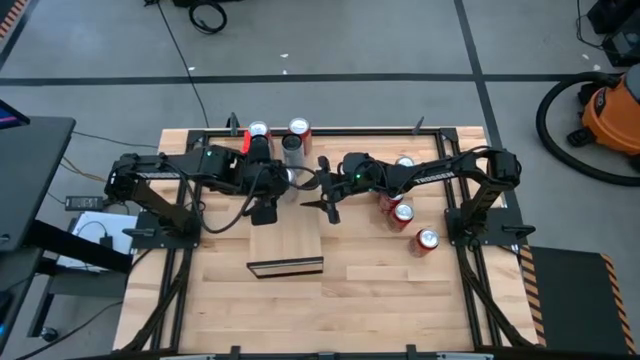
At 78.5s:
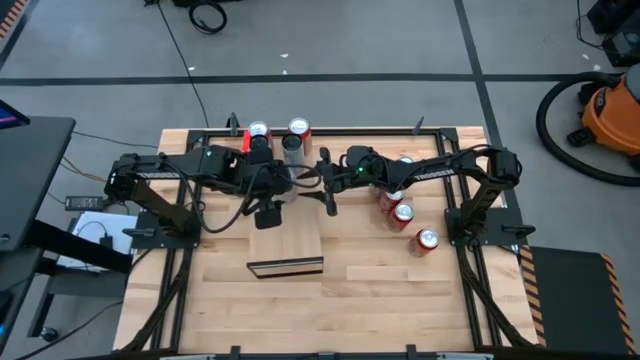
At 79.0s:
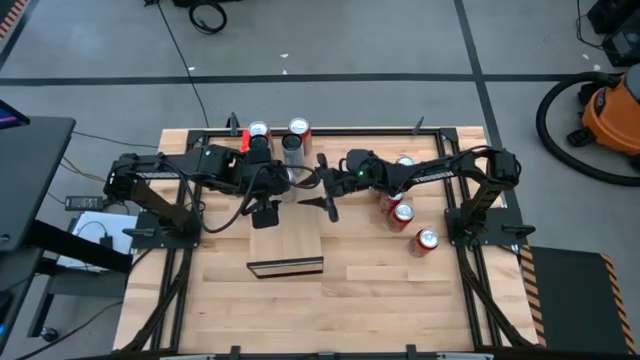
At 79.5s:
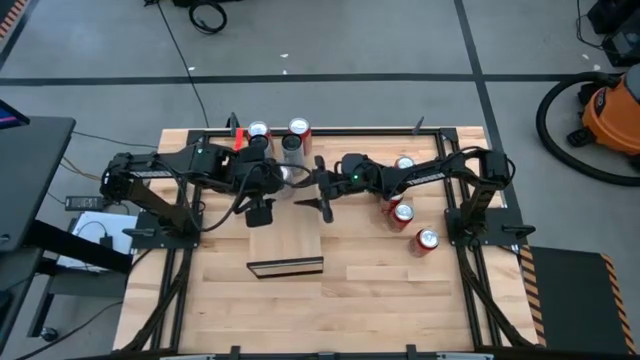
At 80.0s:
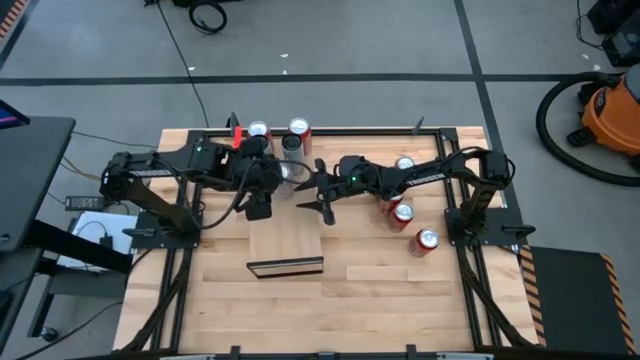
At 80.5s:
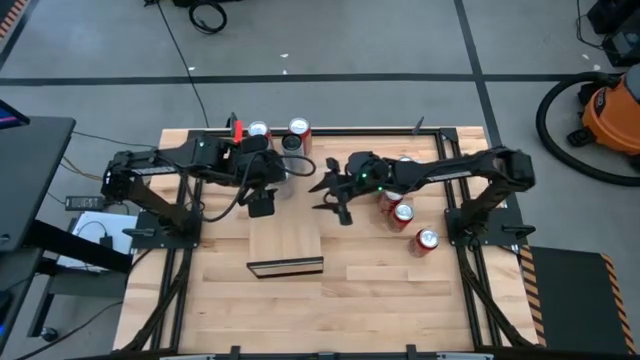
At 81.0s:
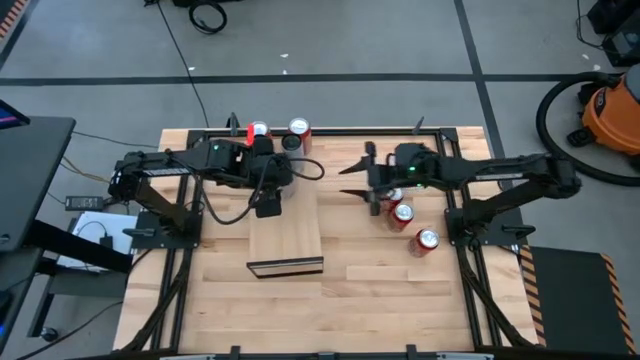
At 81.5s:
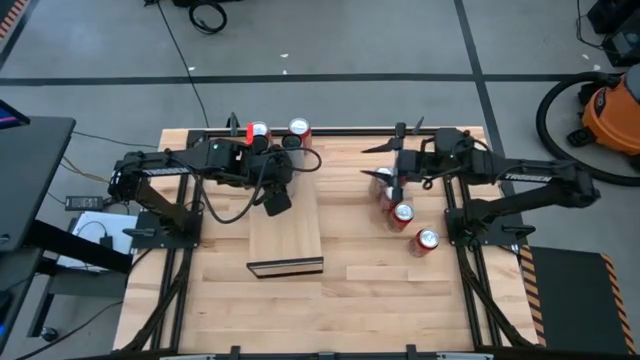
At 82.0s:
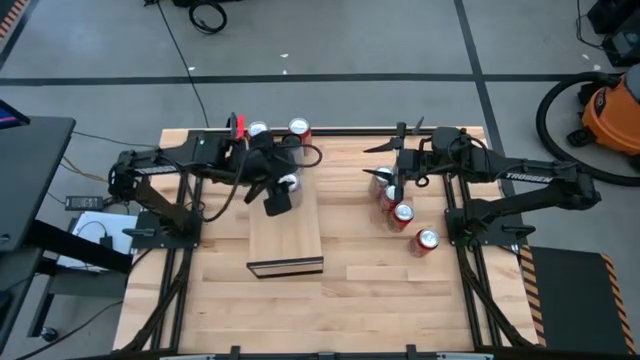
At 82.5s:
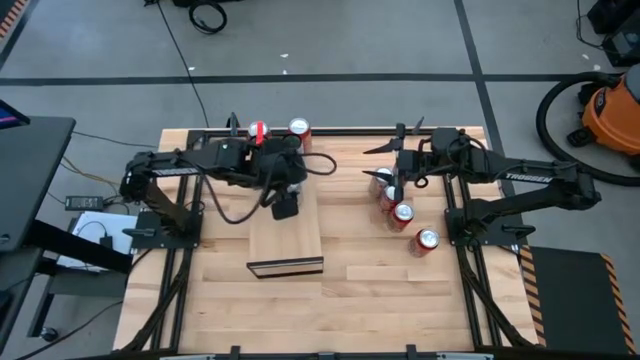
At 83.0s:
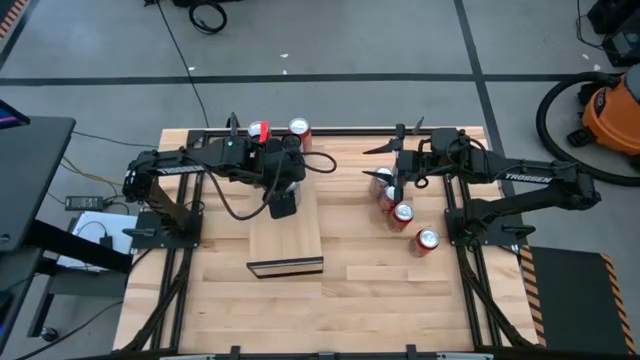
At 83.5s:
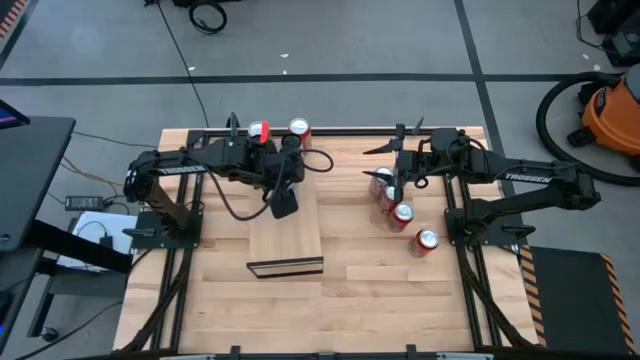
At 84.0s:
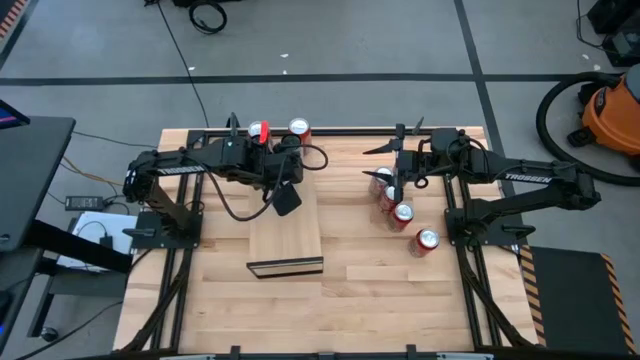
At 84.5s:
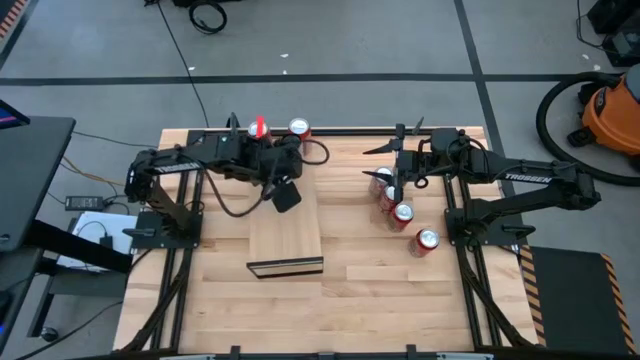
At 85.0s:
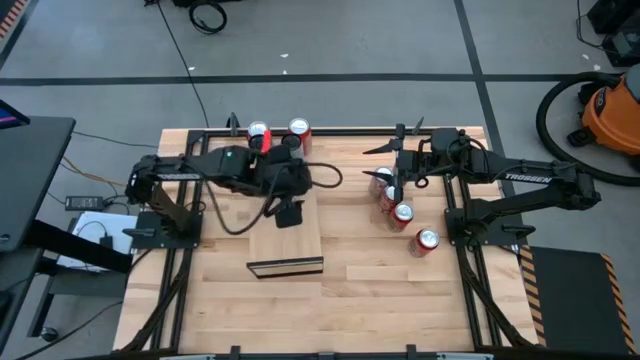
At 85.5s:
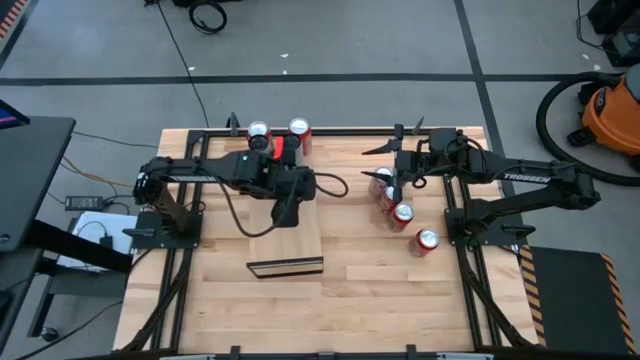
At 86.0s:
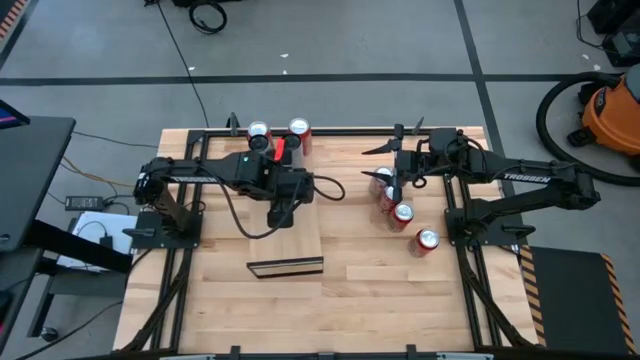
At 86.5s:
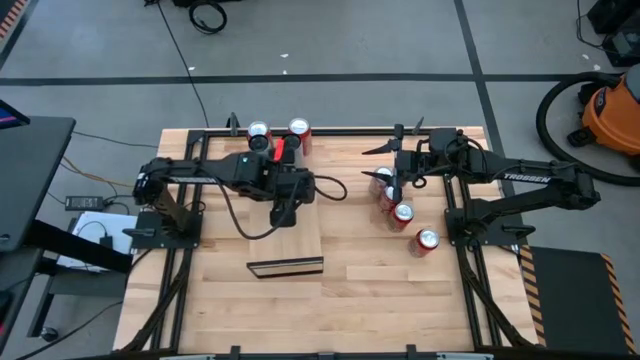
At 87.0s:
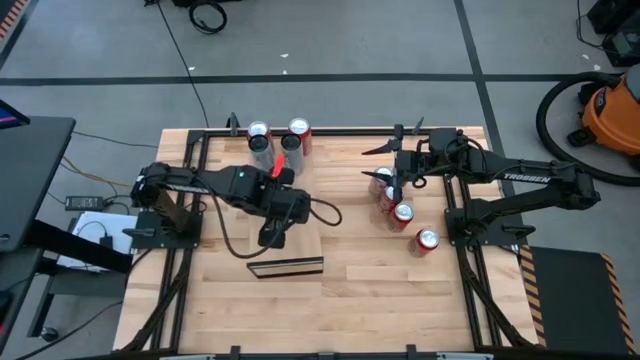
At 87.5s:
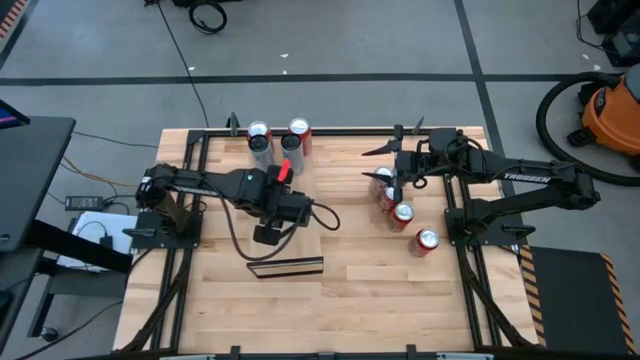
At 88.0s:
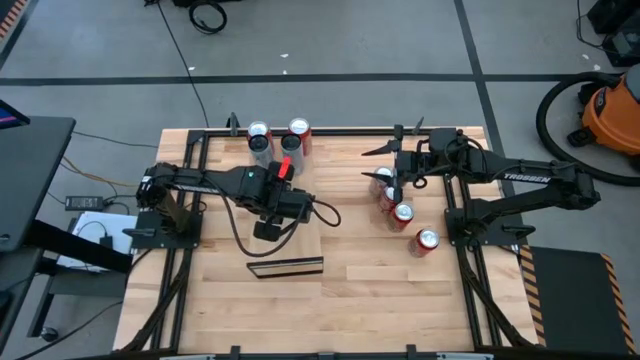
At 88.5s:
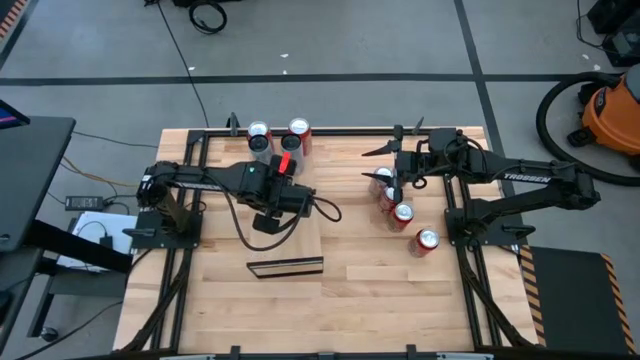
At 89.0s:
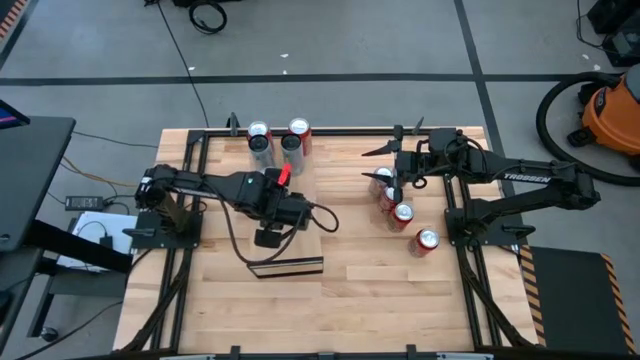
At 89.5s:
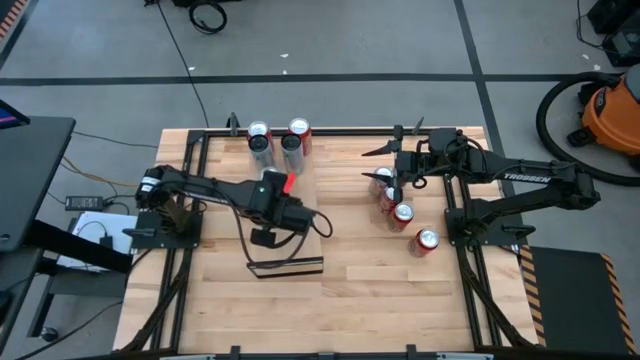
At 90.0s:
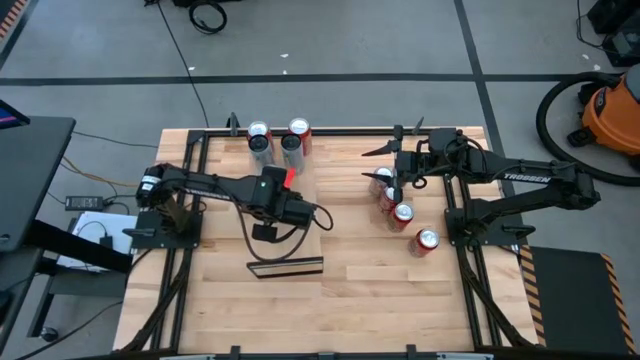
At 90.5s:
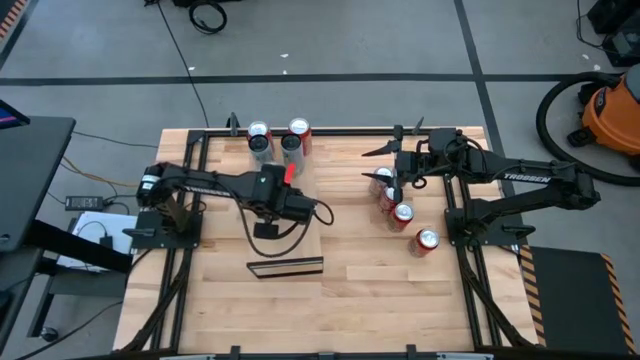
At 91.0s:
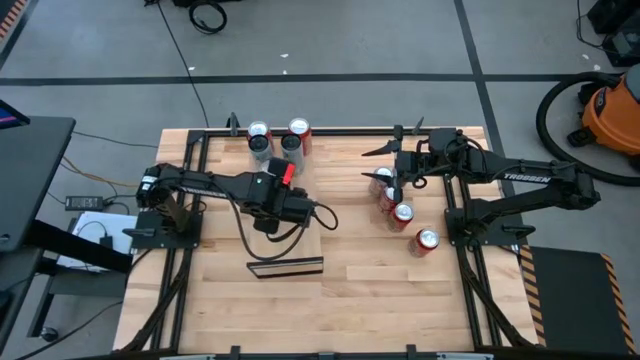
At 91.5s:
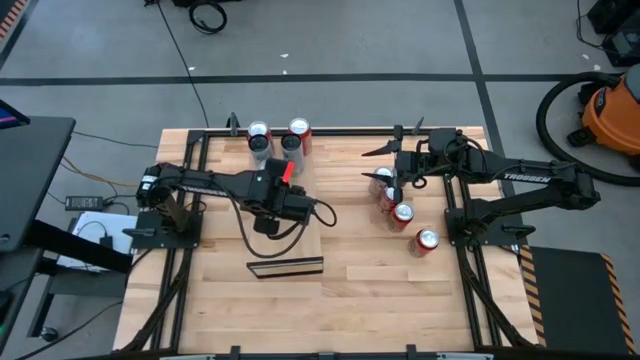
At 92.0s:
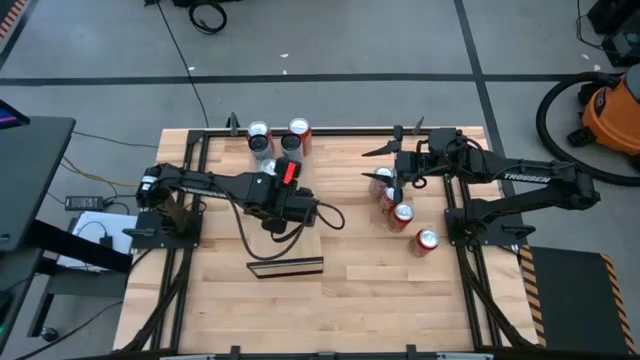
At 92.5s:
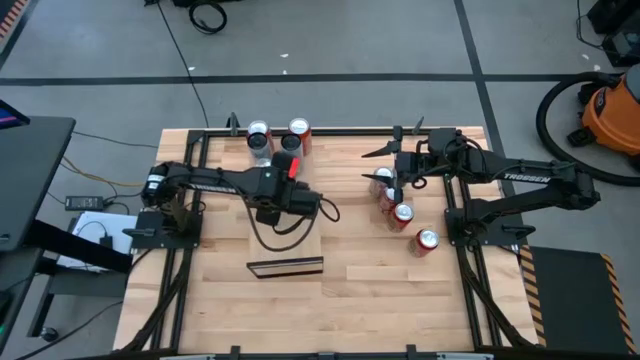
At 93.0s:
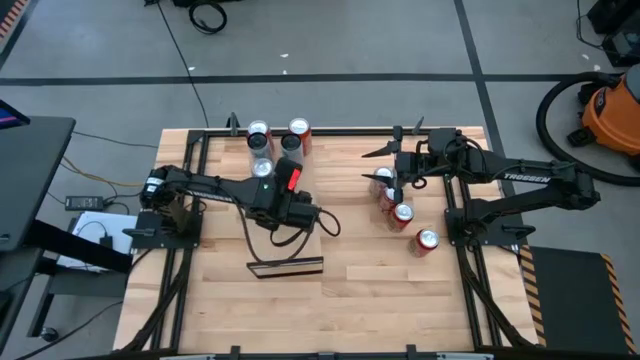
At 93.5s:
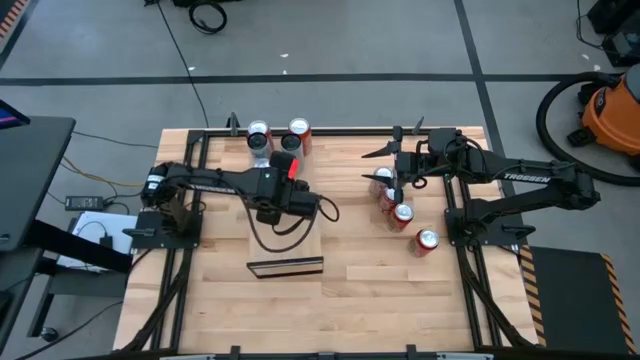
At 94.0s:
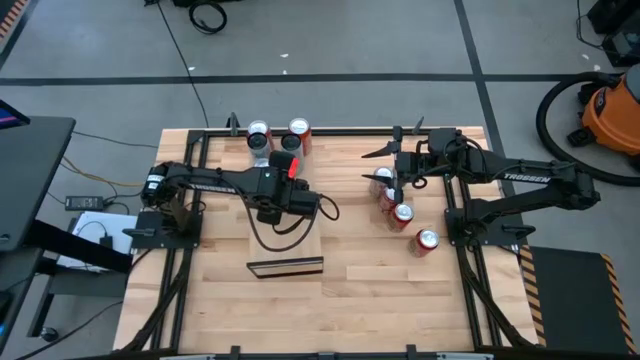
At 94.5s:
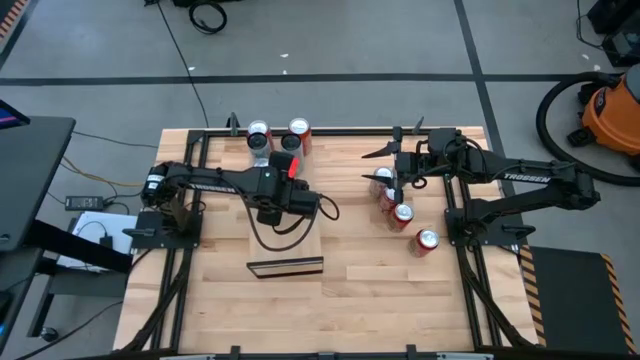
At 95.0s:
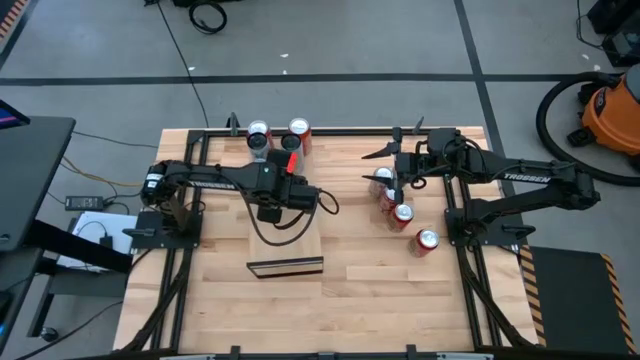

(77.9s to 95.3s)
Task: Place canned beverage on shelf
Put the top red and silver soda can on the shelf

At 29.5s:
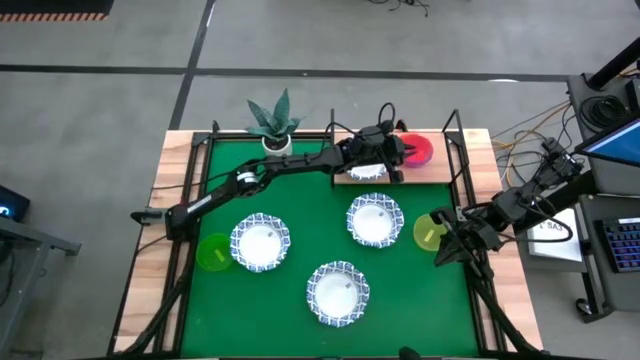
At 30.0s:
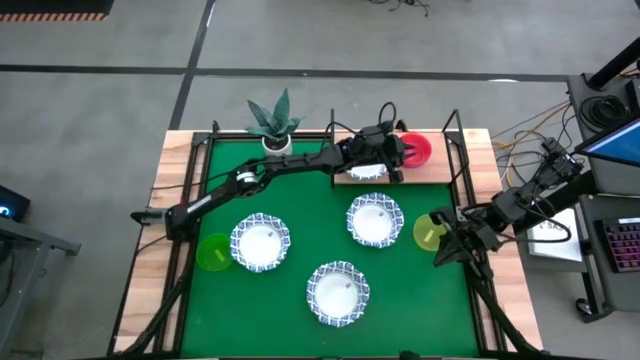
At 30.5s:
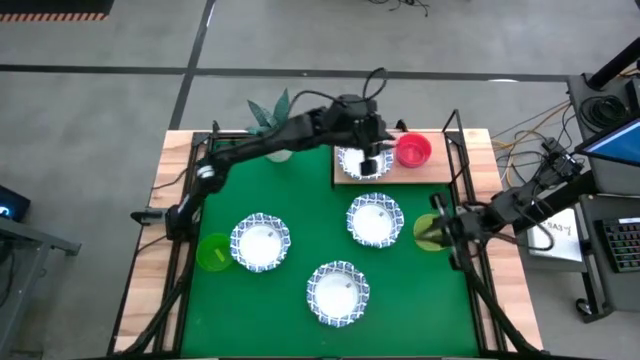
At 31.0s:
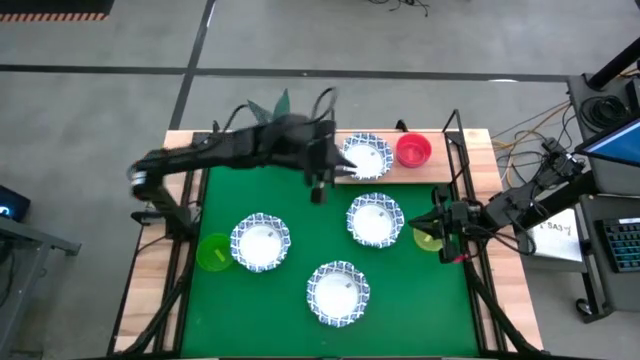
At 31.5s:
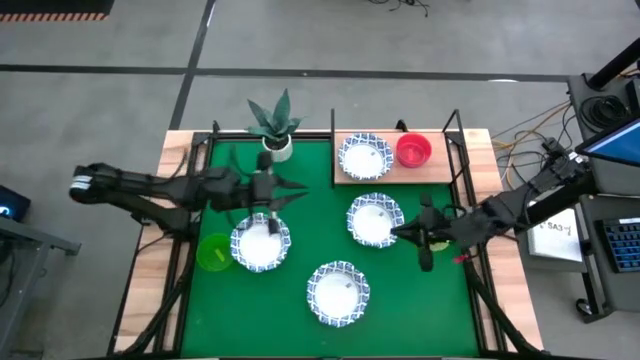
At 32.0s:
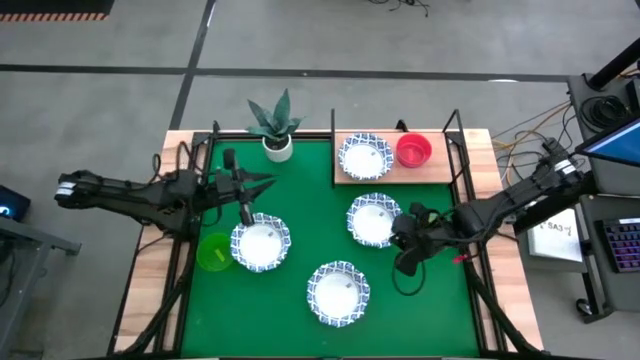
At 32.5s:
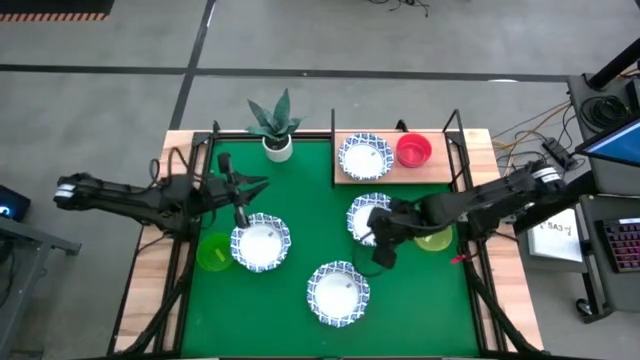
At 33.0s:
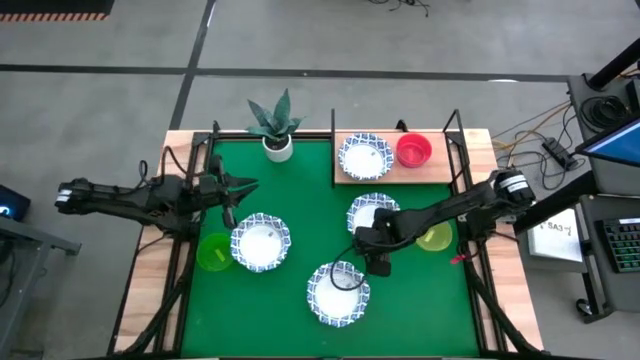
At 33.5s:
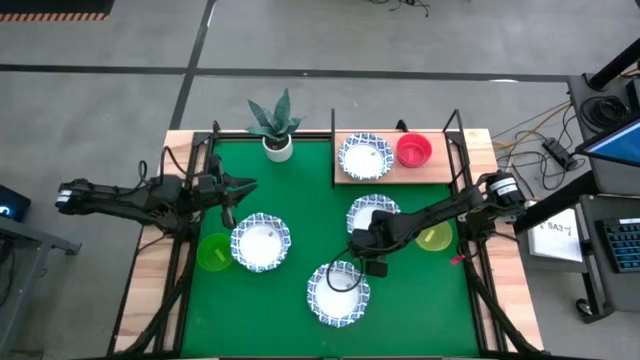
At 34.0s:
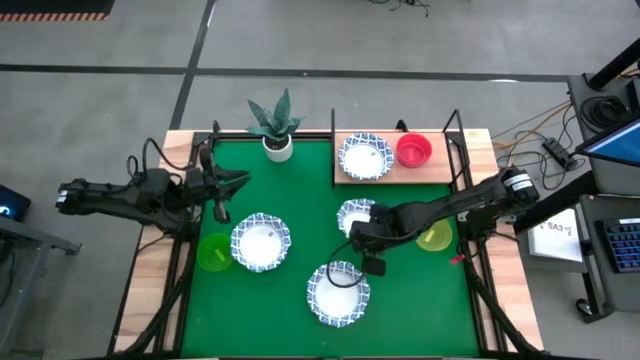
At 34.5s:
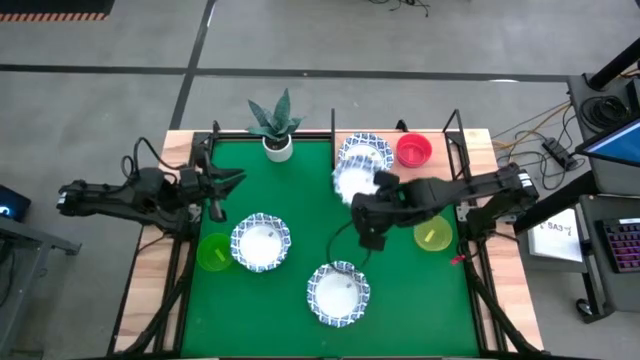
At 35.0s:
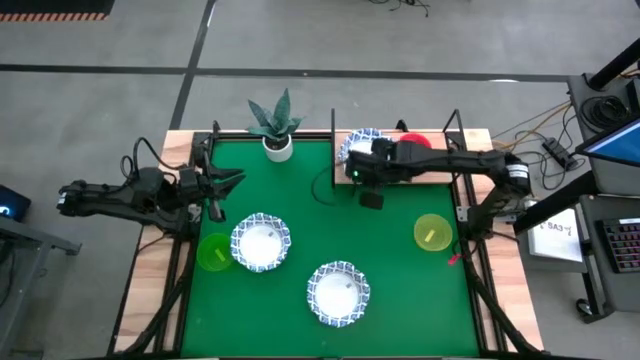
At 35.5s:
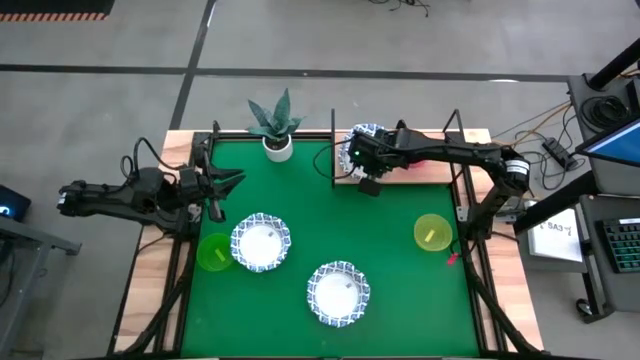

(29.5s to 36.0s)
Task: Place and stack bowls onto a shelf
Stack the white patterned bowl on top of the white patterned bowl on the shelf
